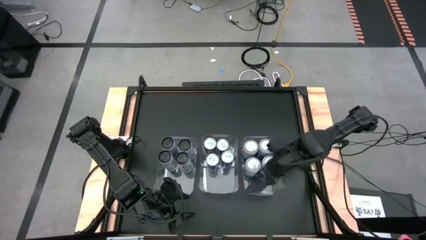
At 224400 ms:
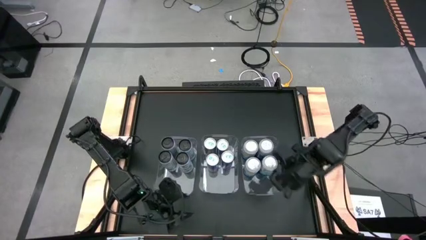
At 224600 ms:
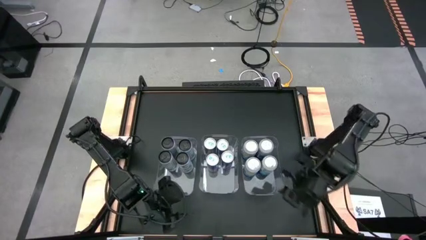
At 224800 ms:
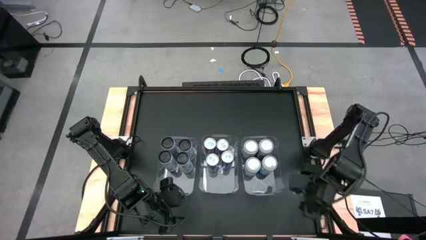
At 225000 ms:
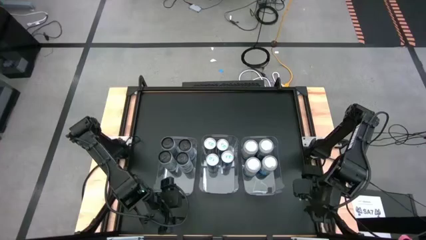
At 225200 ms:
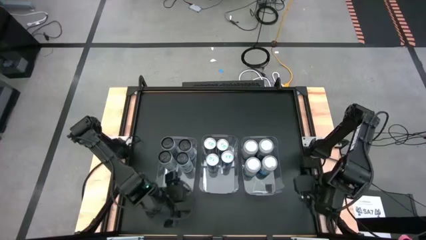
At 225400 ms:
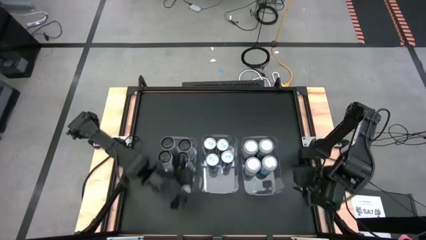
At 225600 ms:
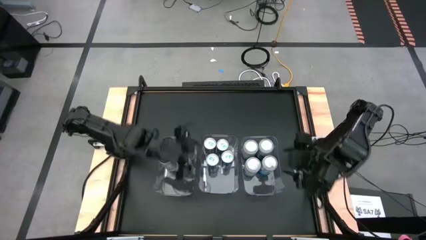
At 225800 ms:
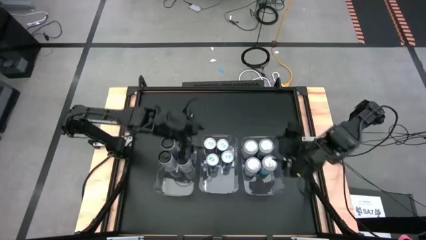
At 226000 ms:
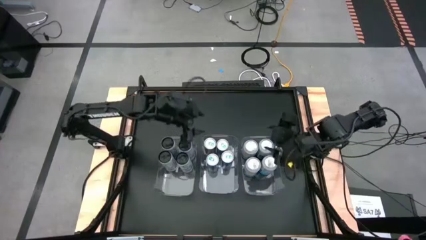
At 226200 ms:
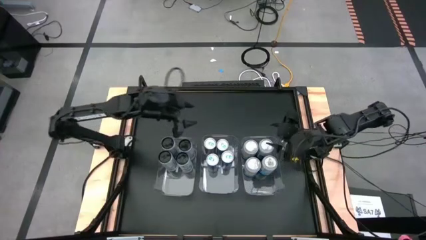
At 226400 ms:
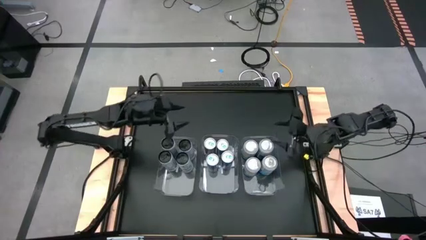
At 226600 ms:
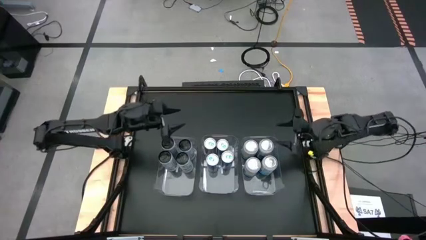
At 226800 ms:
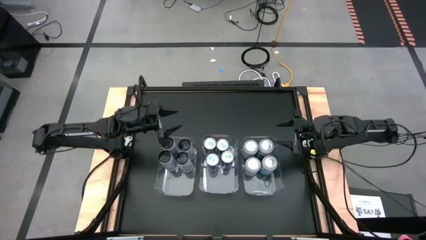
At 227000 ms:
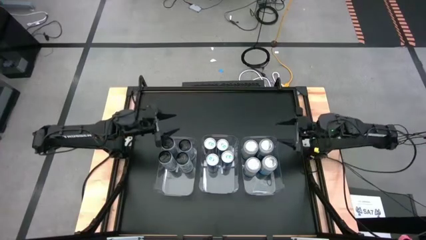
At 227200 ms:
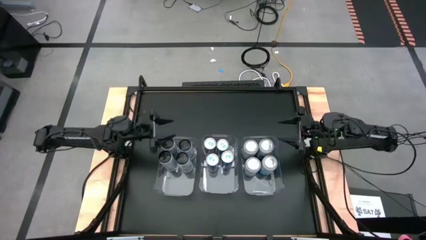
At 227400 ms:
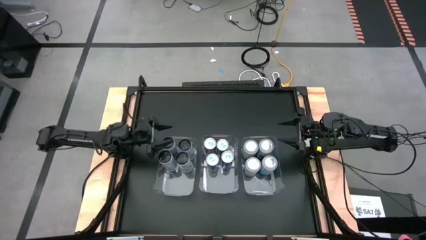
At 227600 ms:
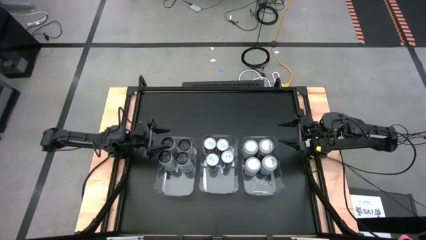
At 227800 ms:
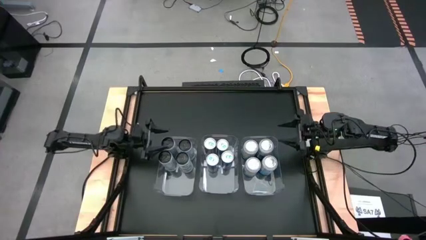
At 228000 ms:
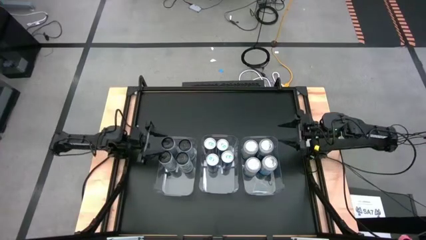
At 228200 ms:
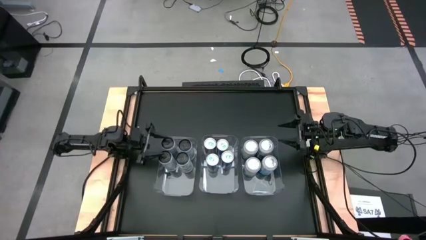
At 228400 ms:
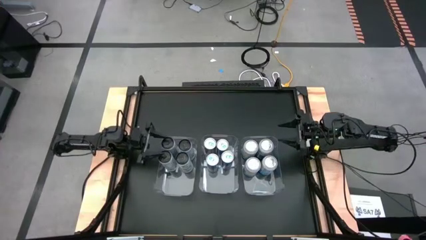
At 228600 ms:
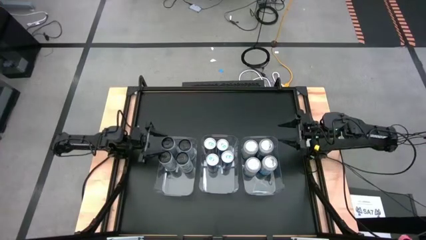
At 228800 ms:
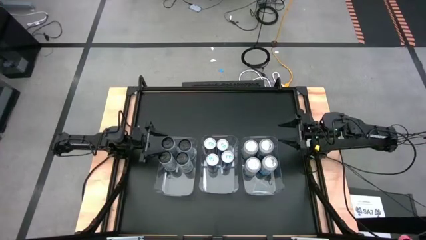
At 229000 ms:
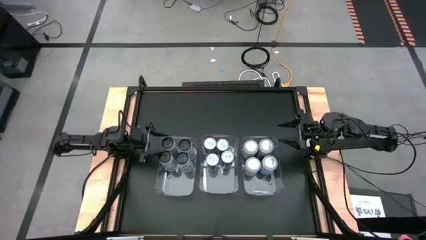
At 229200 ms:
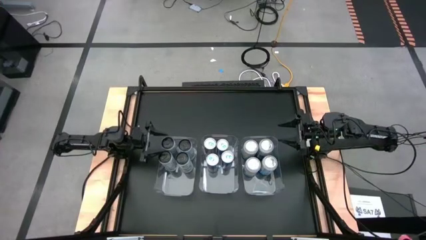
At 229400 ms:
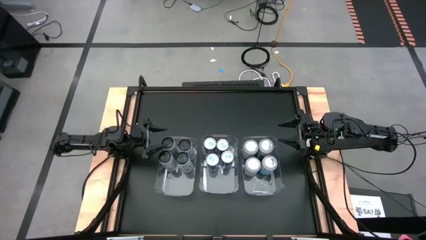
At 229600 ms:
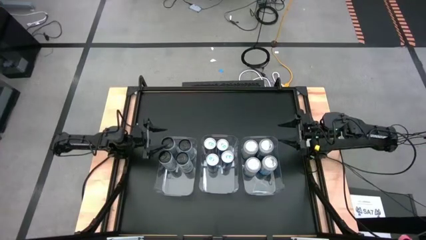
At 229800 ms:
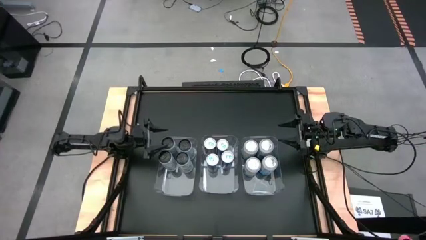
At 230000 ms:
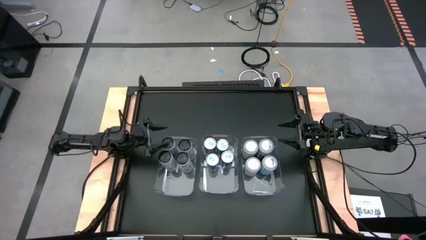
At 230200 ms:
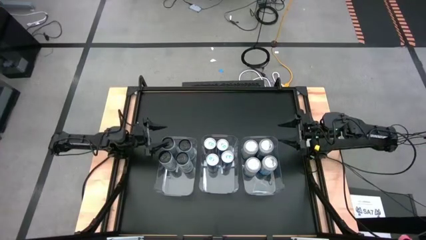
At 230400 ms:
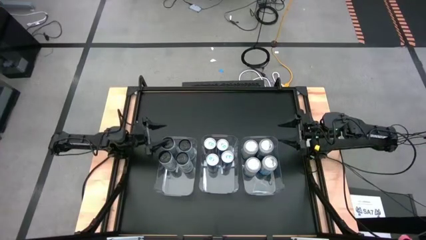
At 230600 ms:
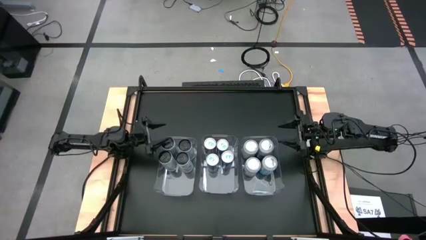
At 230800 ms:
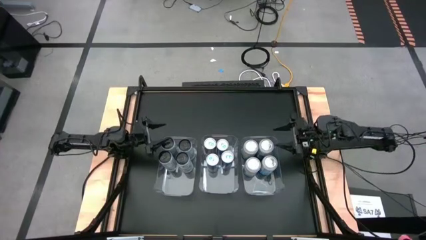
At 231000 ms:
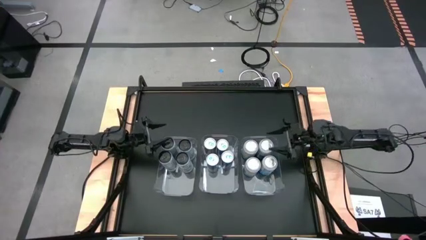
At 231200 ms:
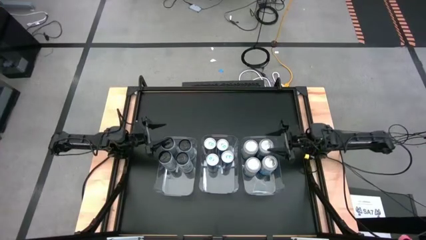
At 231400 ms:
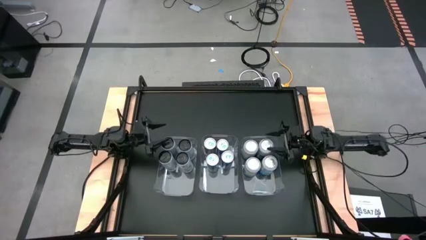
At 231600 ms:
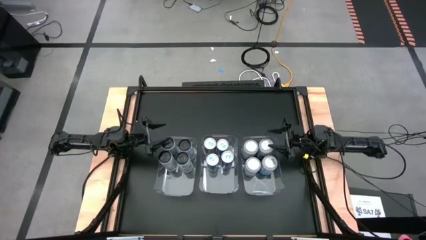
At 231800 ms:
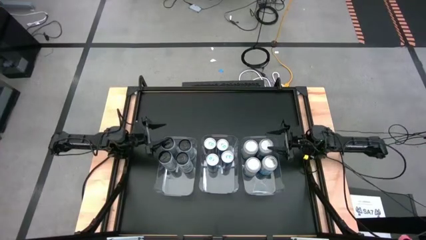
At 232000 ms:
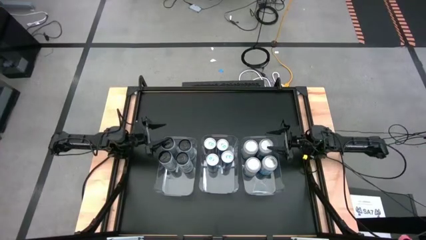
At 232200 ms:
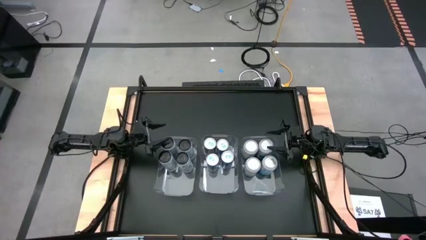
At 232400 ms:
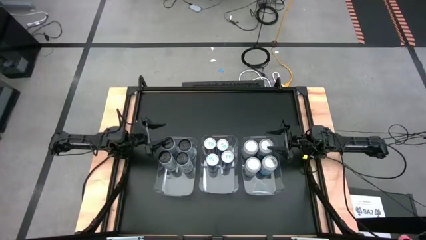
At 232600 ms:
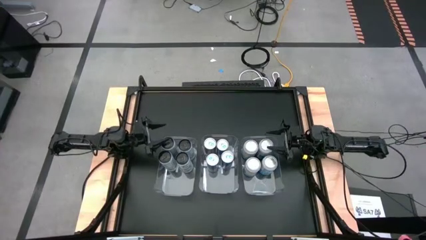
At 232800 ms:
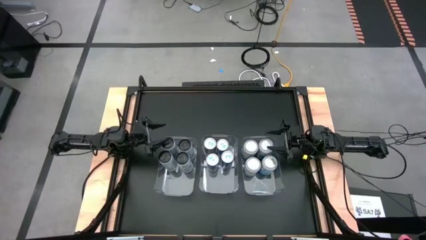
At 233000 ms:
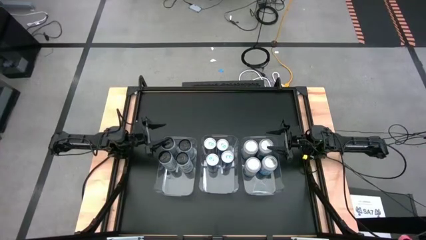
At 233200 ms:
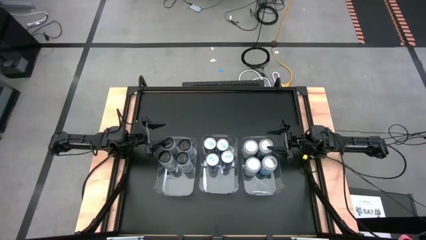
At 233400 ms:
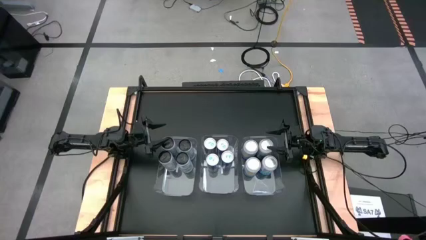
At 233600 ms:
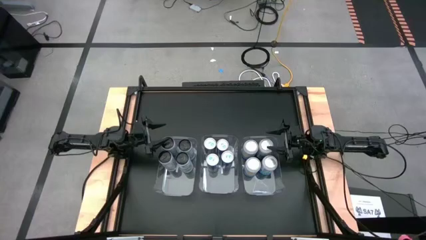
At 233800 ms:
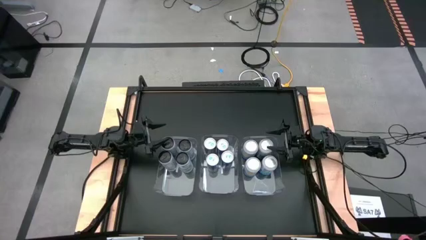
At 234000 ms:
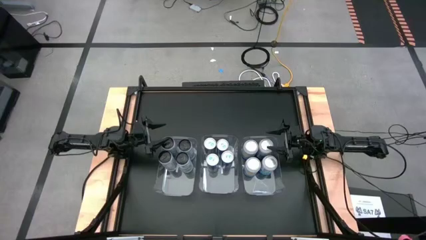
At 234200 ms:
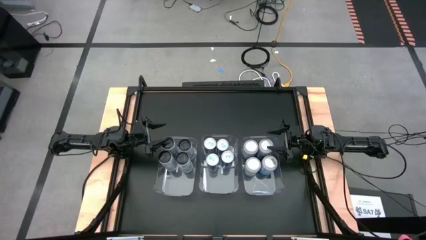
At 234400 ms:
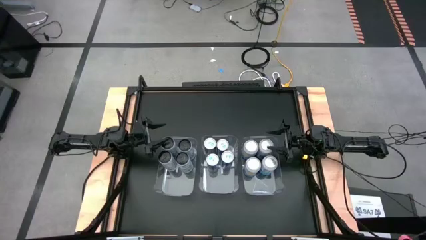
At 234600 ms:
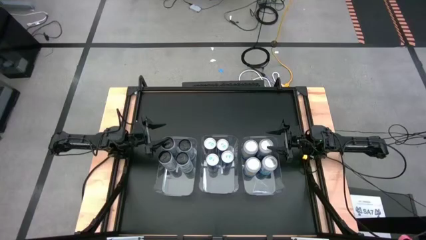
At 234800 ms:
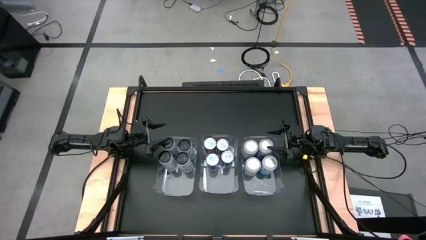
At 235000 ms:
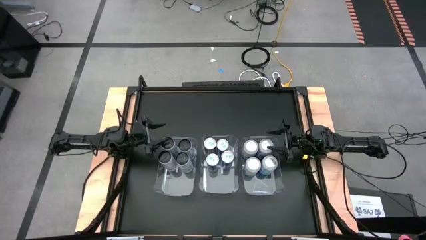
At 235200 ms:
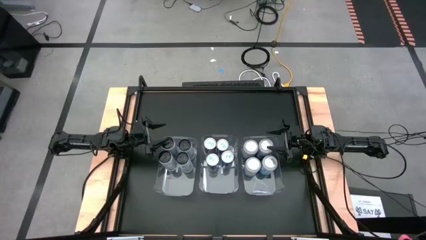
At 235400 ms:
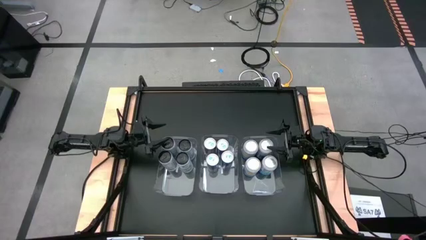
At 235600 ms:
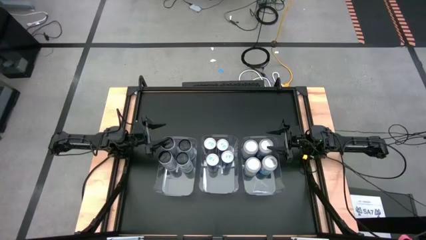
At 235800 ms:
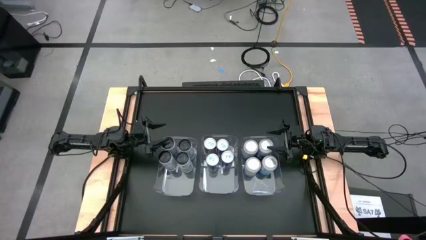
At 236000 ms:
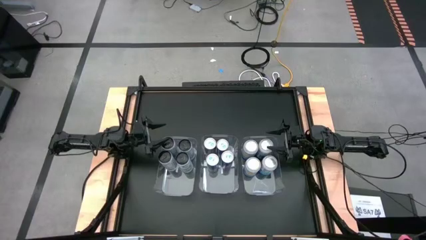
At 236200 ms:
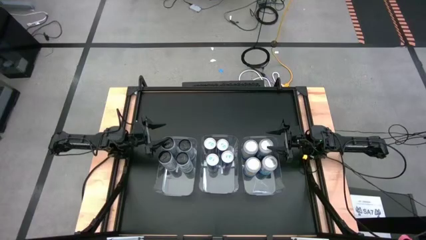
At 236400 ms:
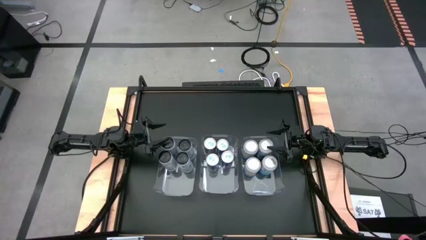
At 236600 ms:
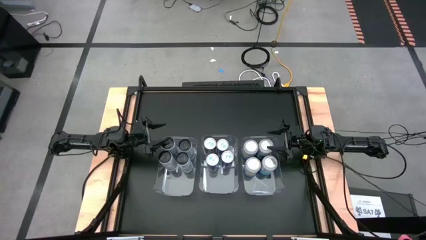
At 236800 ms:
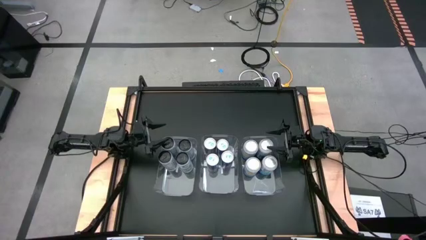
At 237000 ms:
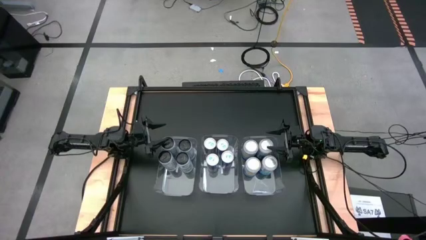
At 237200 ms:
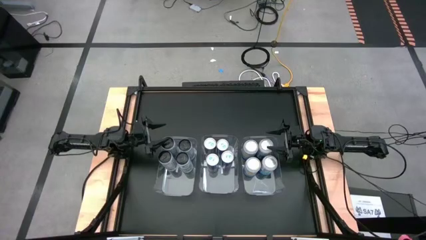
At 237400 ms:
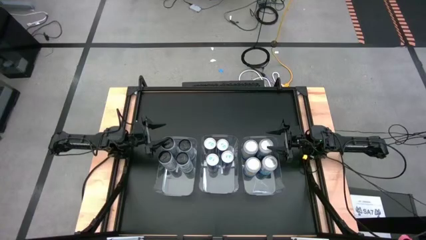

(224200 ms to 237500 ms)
Task: Sort soda cans
Return to Home Position

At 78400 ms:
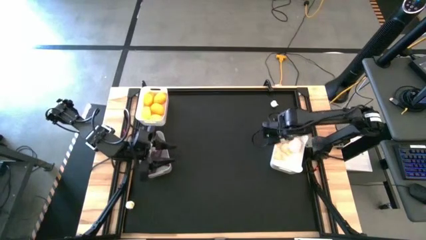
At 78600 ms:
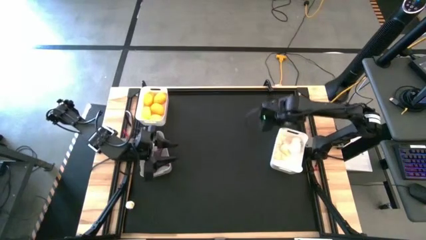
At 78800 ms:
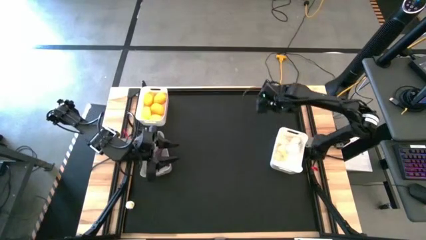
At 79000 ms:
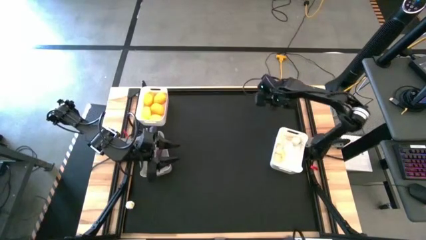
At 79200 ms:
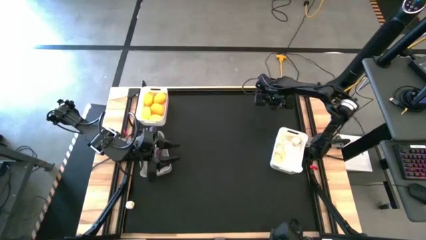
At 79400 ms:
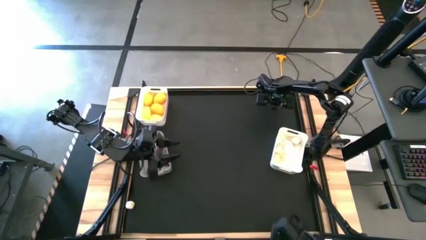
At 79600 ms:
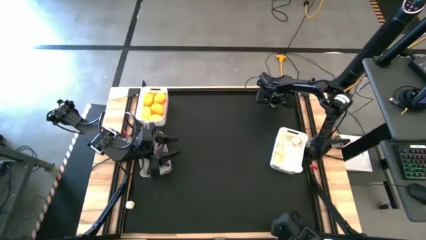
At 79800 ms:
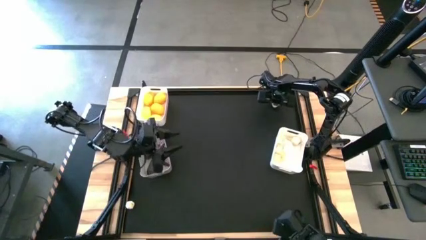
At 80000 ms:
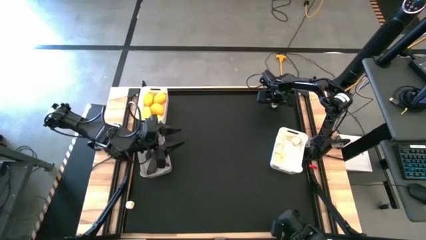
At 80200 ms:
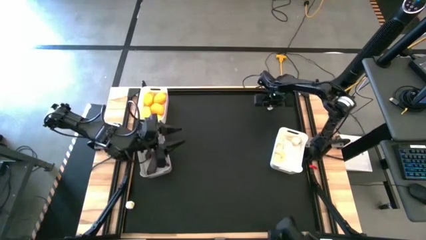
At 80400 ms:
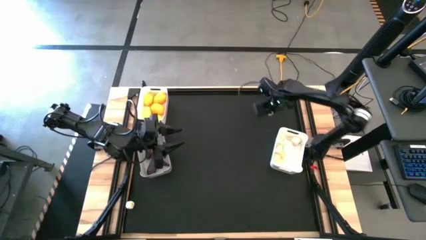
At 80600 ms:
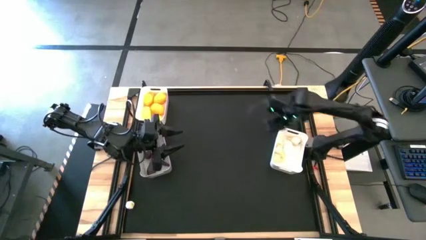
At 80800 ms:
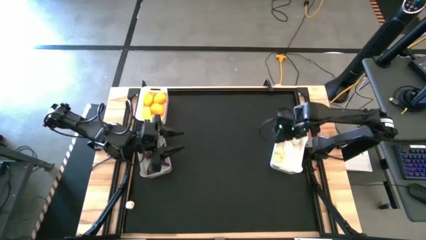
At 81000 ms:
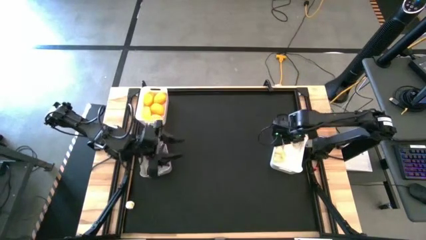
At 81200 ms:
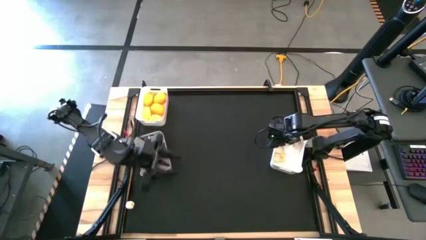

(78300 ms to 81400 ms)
Task: Sort produce into baskets
Put the white garlic into the bottom white bin
